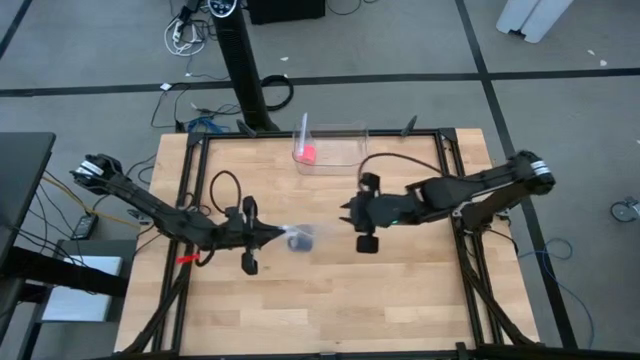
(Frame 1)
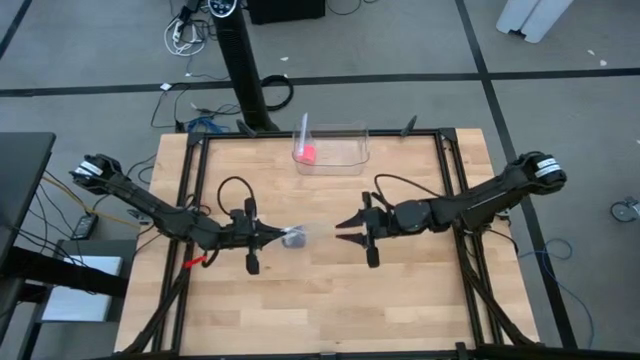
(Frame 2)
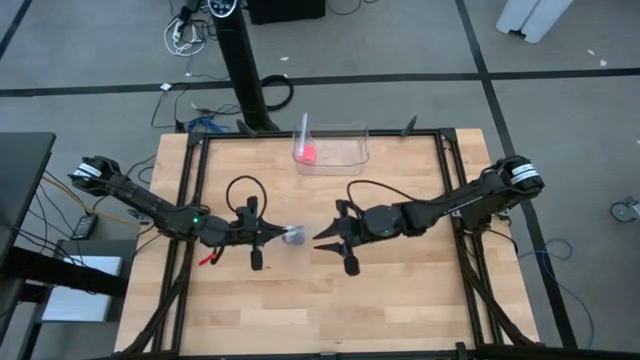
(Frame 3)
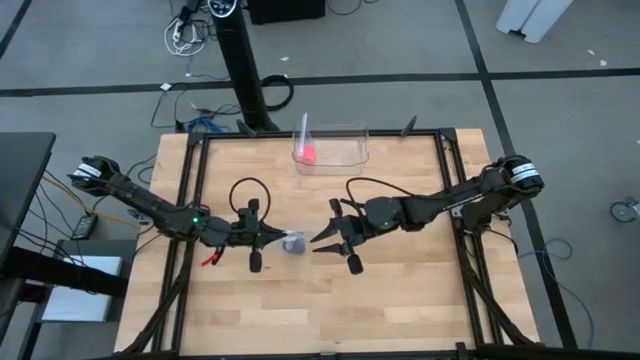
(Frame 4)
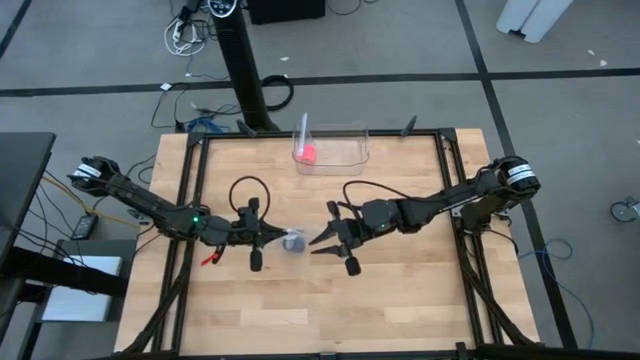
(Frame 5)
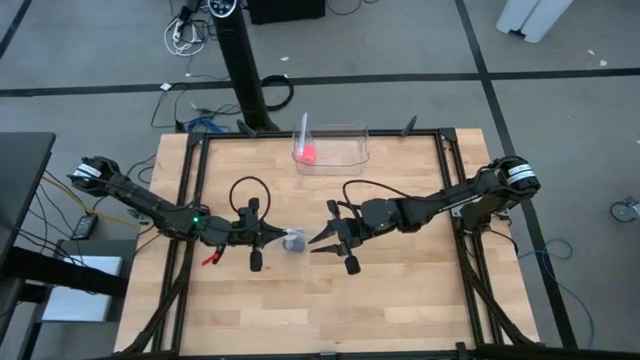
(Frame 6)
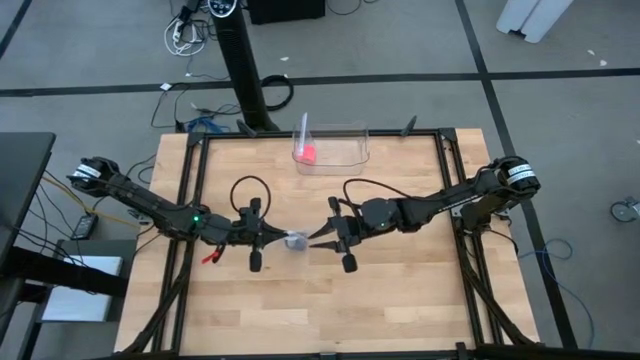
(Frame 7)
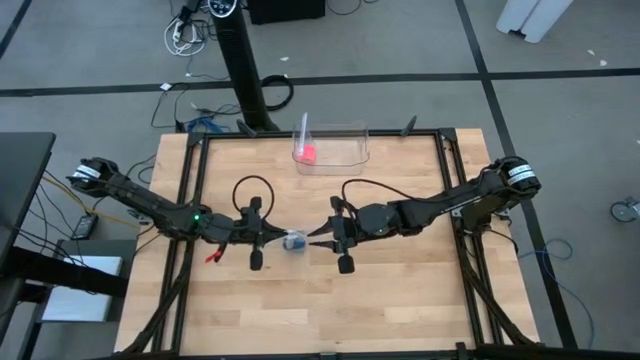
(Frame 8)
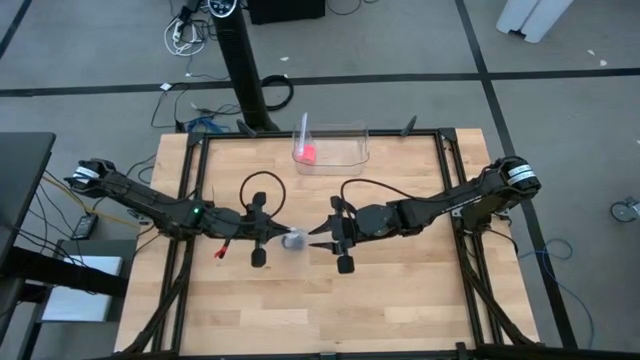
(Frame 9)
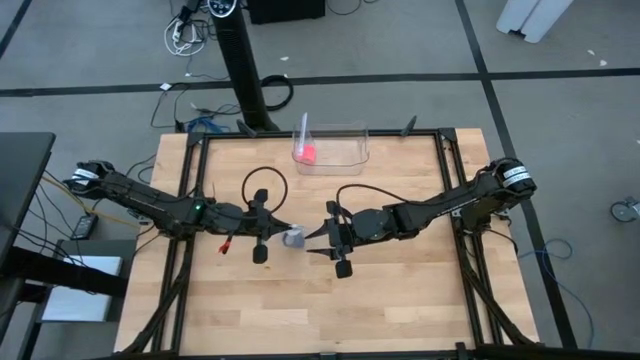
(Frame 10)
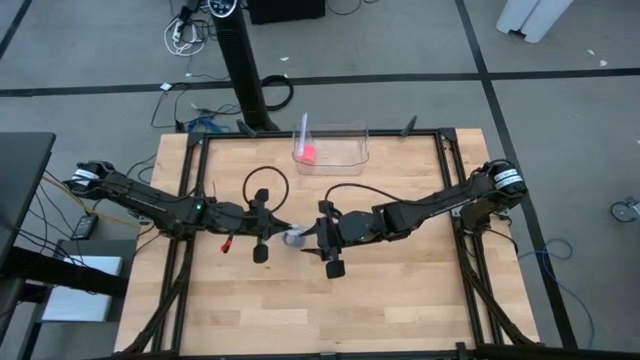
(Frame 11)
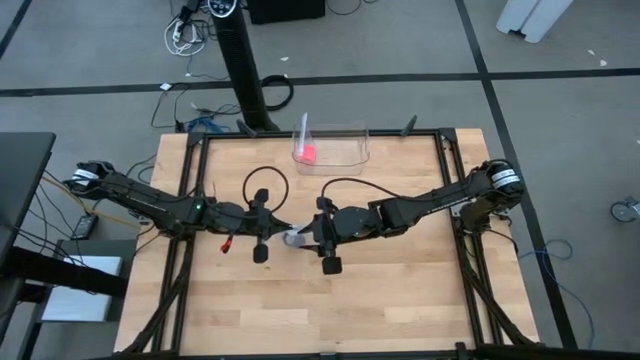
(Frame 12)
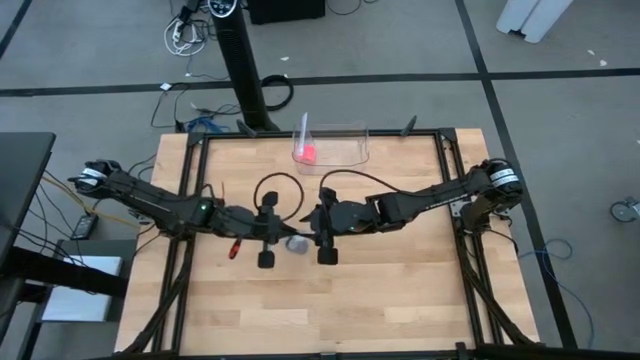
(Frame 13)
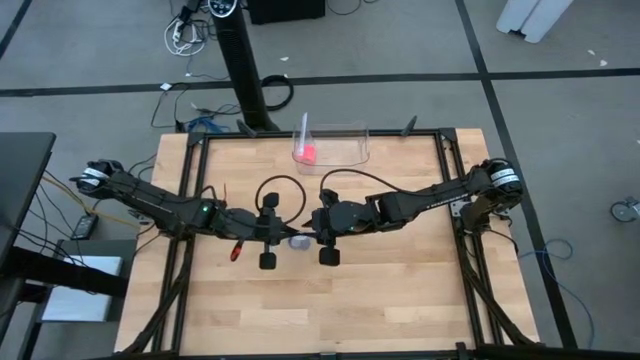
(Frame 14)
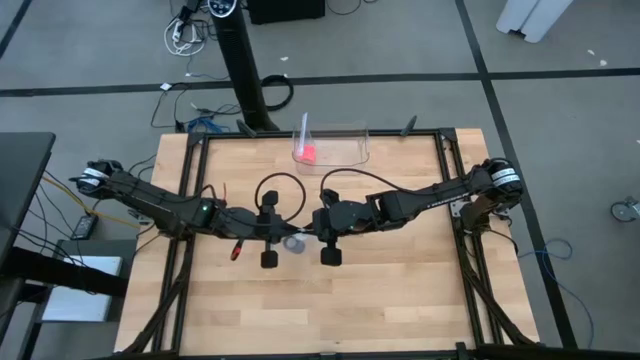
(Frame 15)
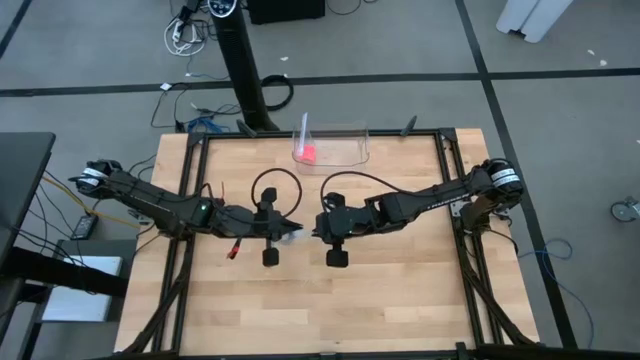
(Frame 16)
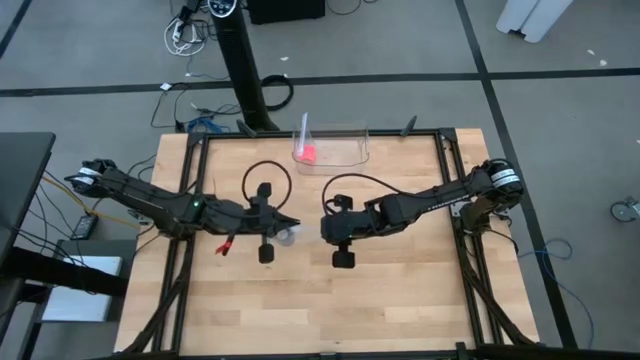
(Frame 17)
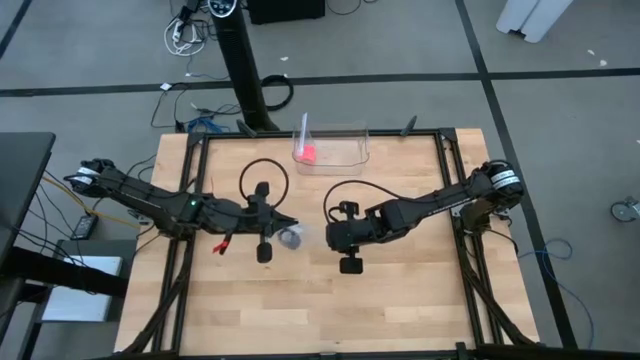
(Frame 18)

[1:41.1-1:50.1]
Task: Roll bandage
Close the transparent zip bag

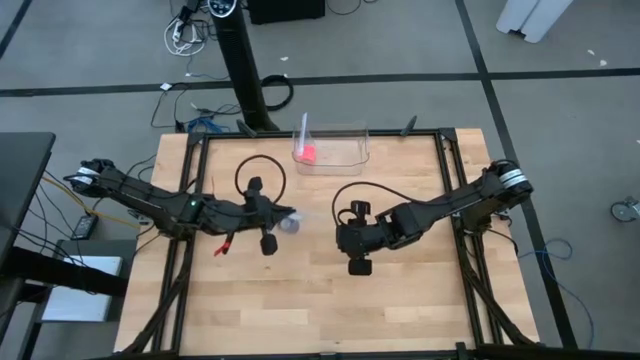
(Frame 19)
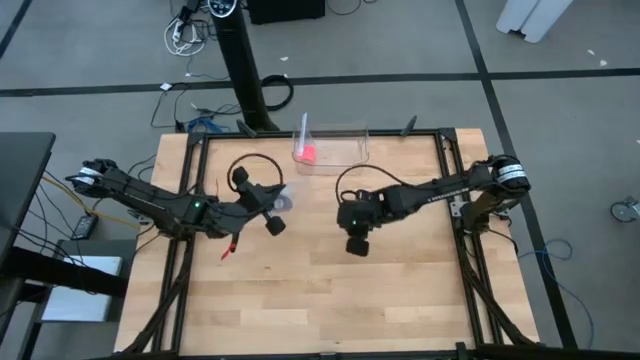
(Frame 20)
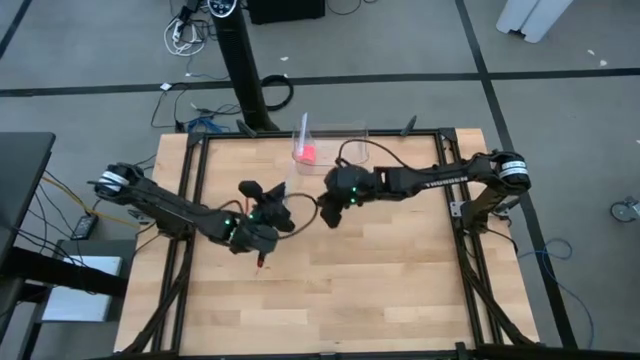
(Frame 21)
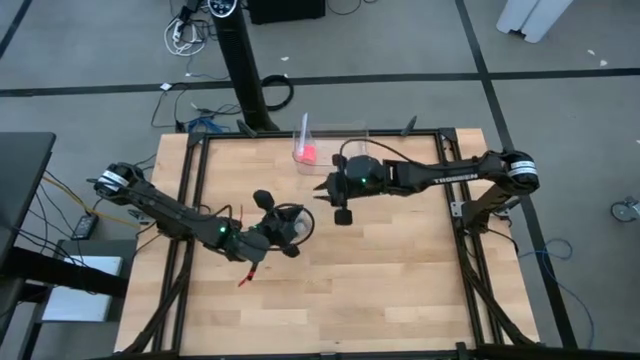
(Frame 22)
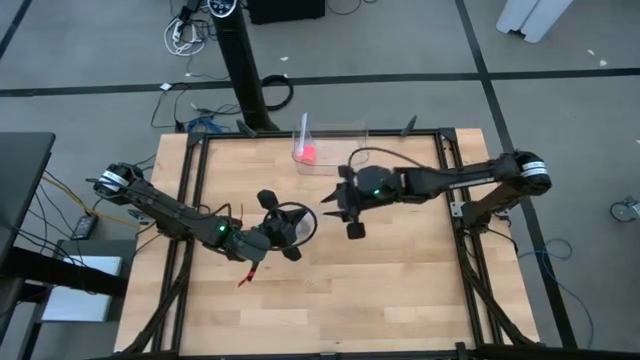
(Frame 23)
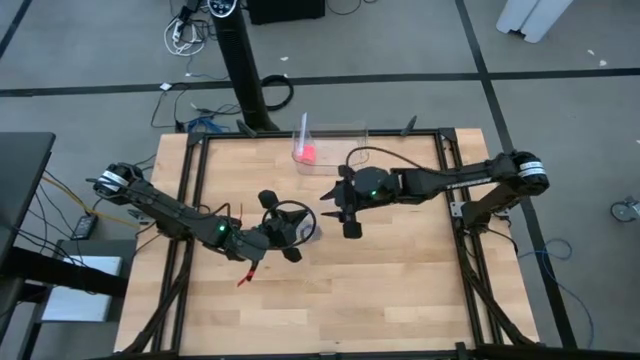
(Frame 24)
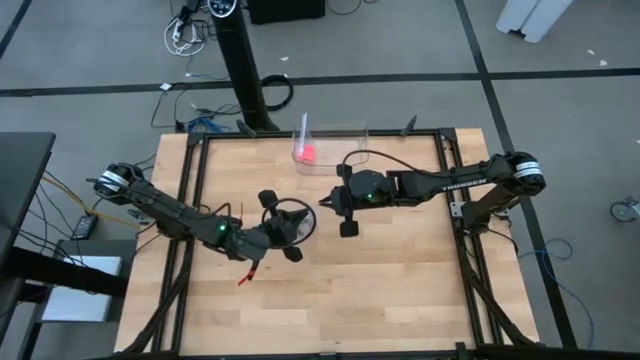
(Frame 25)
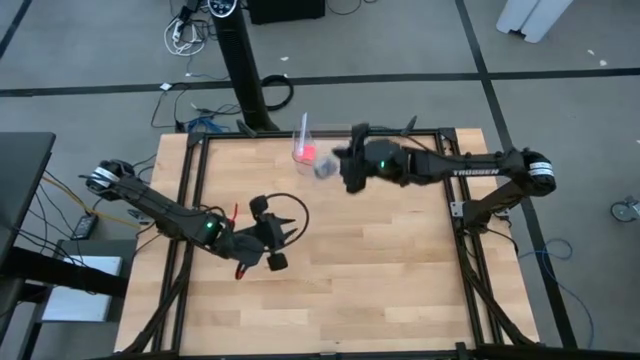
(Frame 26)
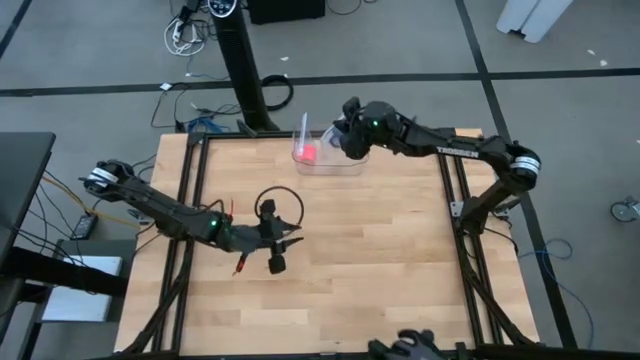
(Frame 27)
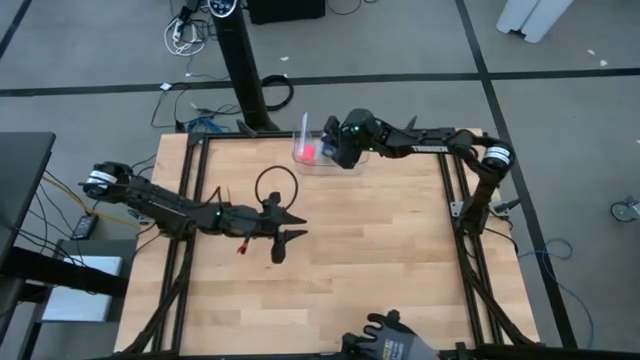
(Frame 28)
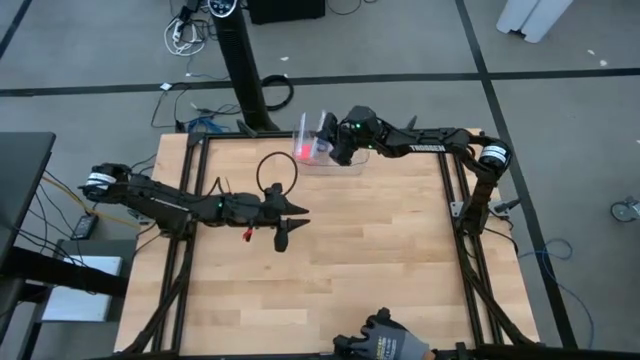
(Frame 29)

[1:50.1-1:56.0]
Put the packed rolled bandage into the transparent bin

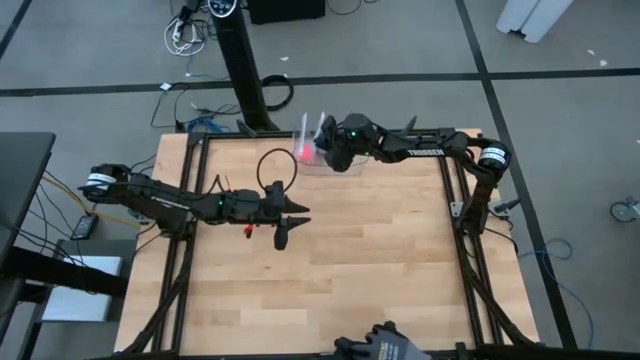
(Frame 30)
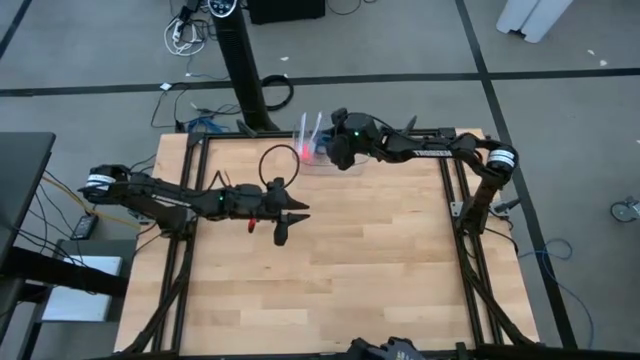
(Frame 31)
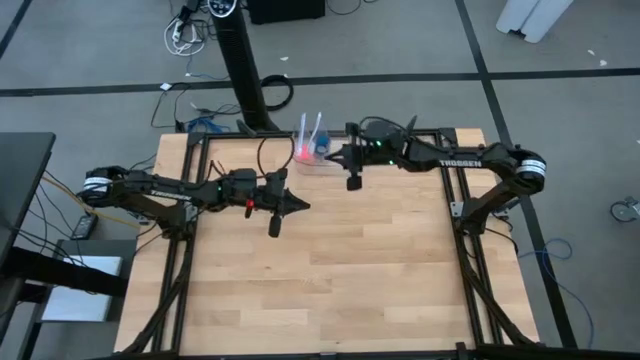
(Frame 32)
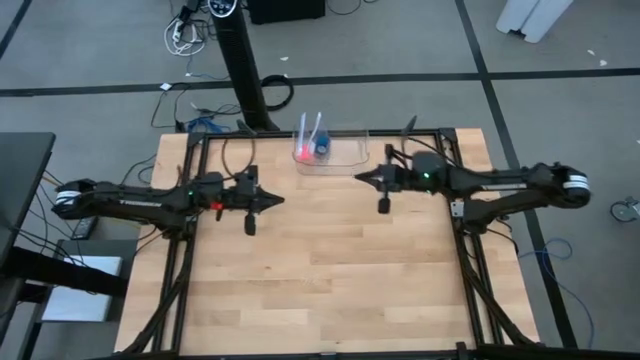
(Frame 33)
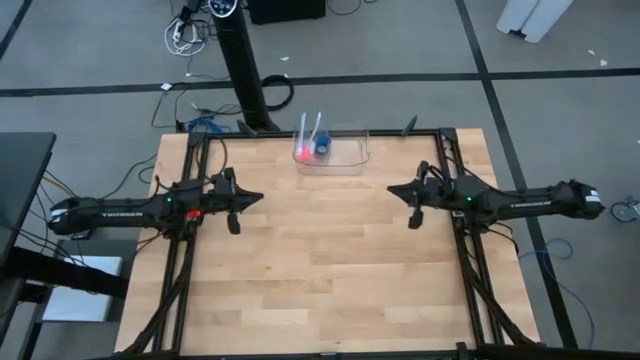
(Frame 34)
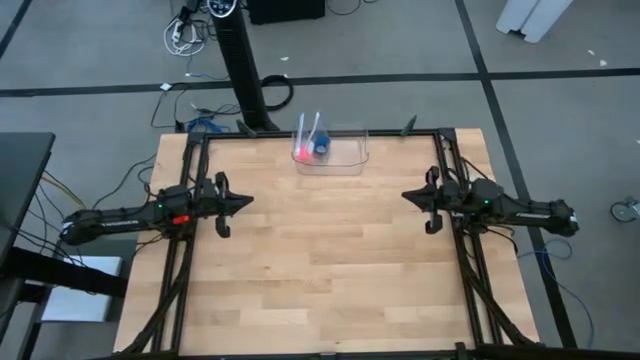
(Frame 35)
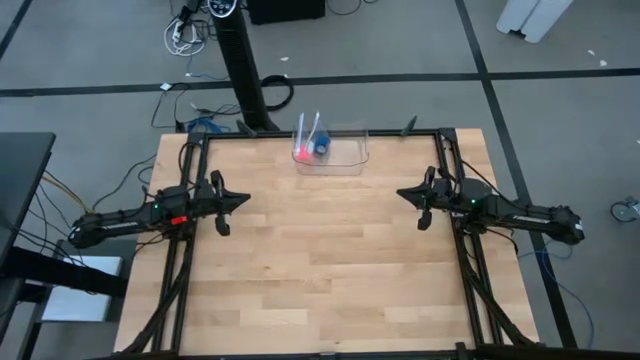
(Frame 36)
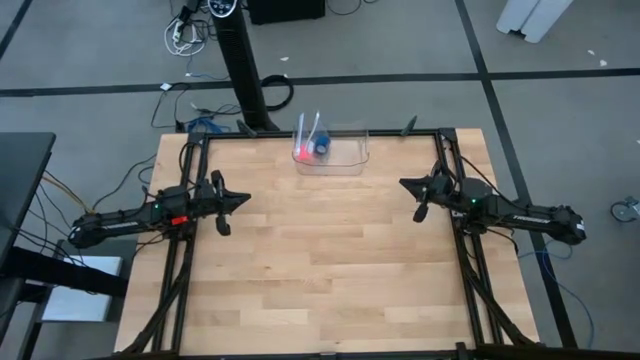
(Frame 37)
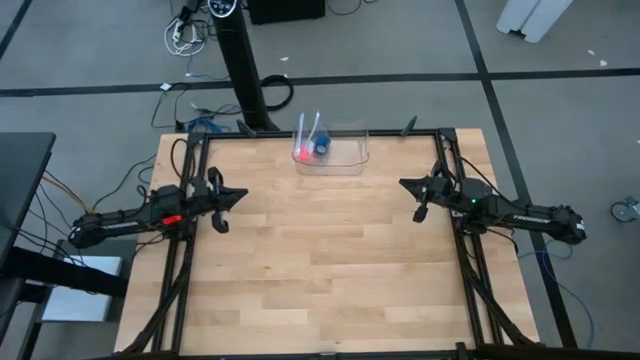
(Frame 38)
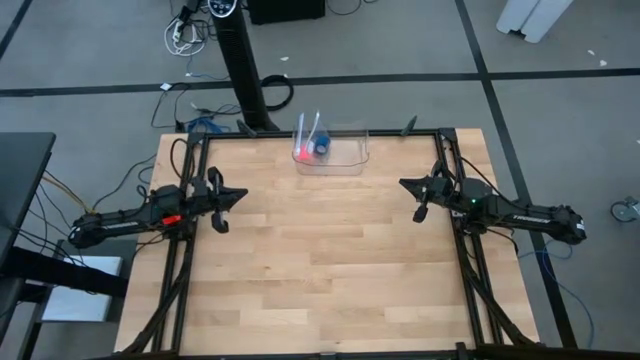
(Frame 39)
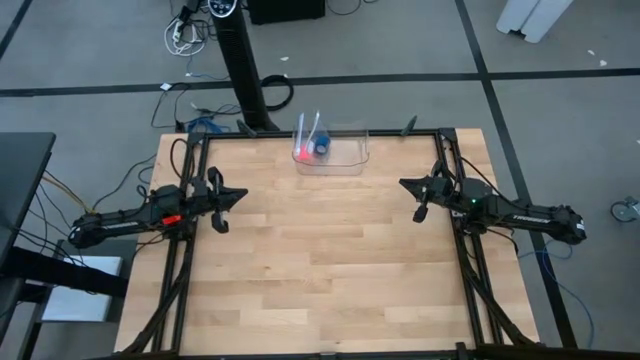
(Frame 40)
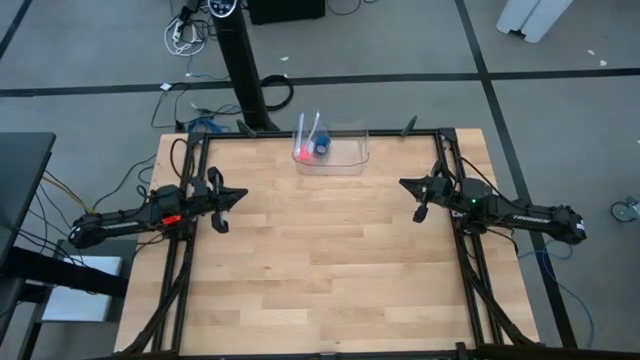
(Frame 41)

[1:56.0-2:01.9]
Return to Home Position

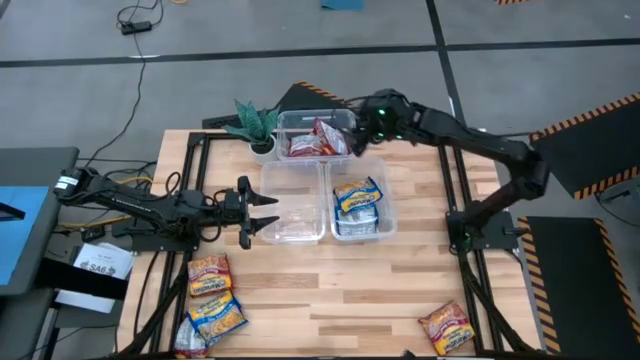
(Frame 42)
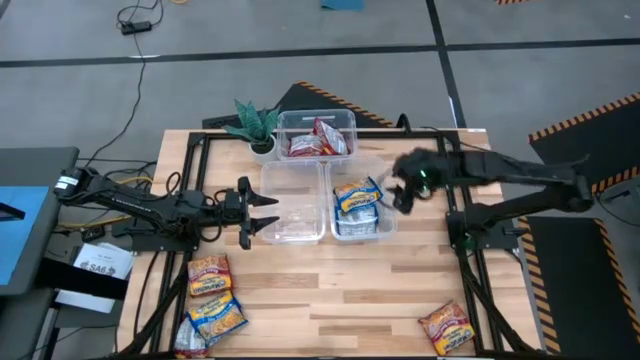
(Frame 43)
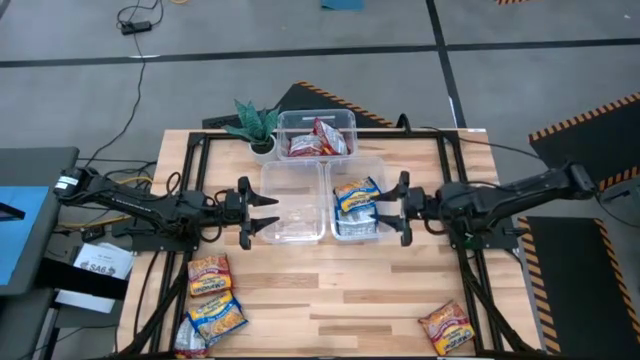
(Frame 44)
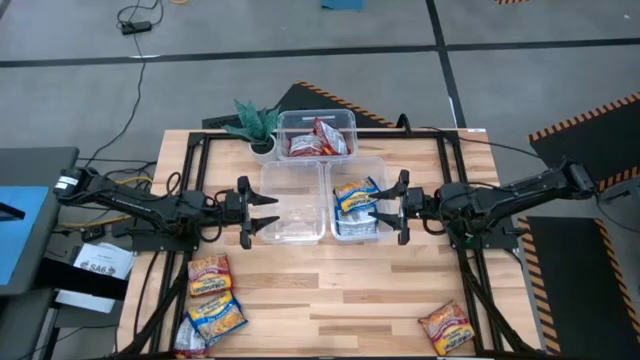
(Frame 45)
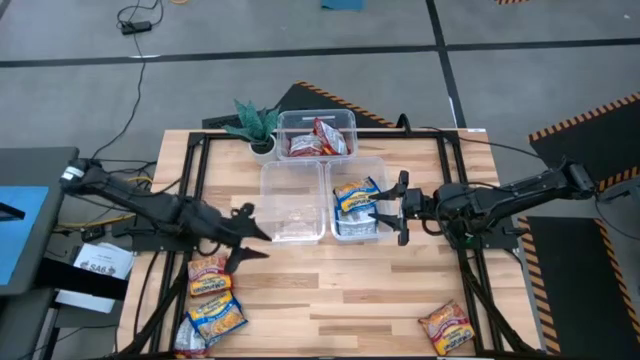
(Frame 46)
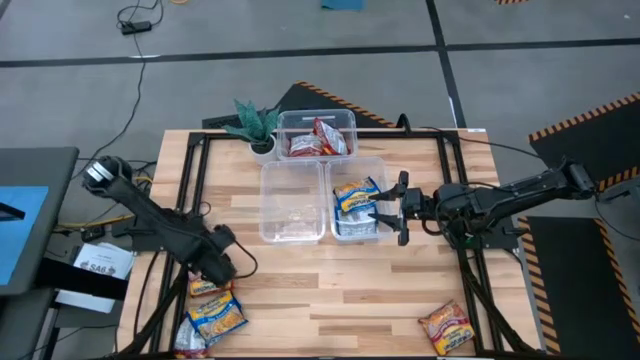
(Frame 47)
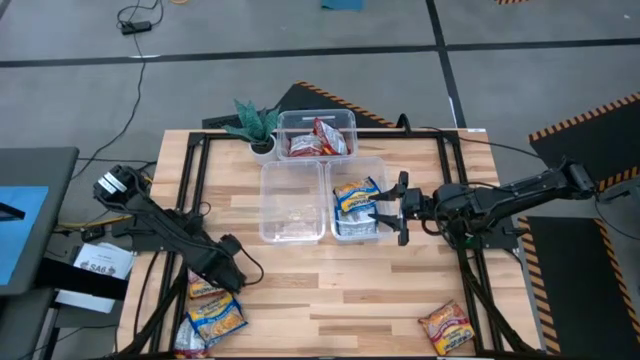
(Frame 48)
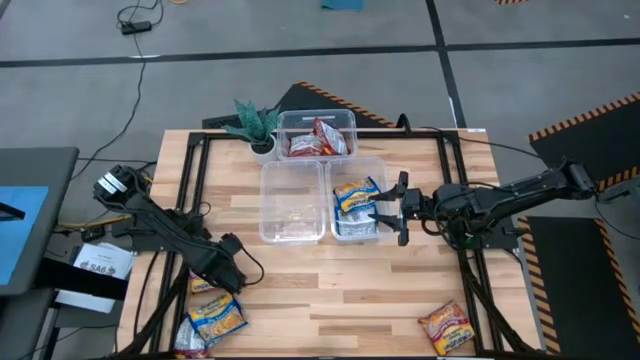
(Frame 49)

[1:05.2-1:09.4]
Task: Sort Maruchan noodles
Put the red noodle pack into the bottom left transparent bin
